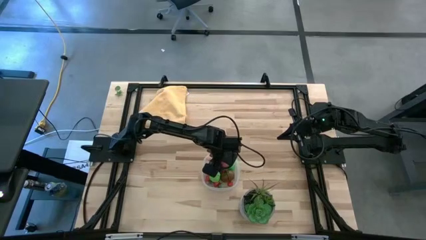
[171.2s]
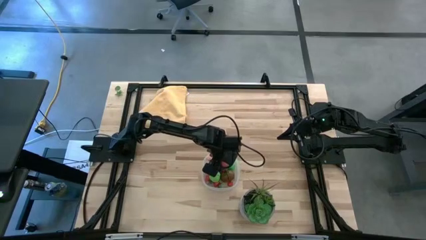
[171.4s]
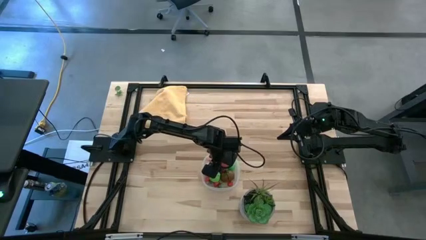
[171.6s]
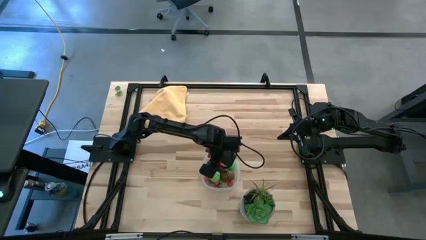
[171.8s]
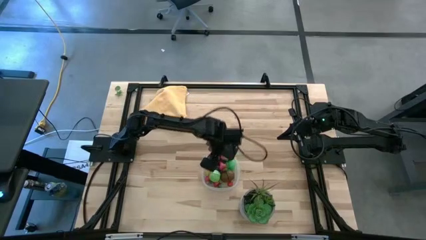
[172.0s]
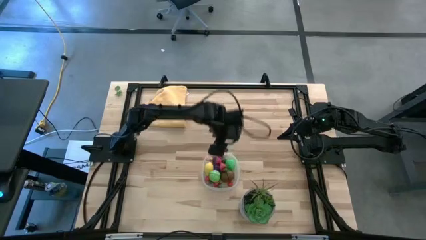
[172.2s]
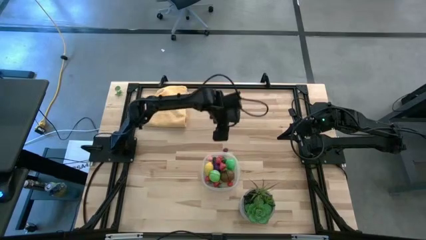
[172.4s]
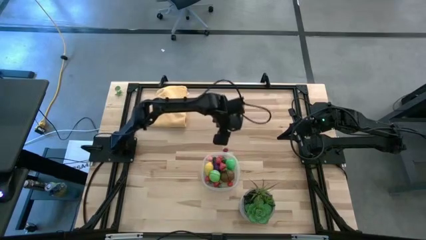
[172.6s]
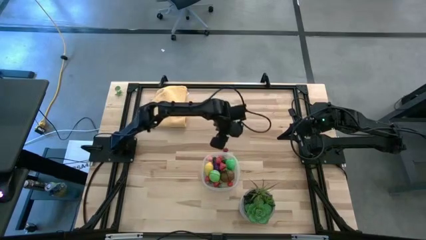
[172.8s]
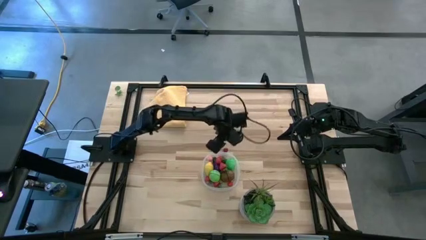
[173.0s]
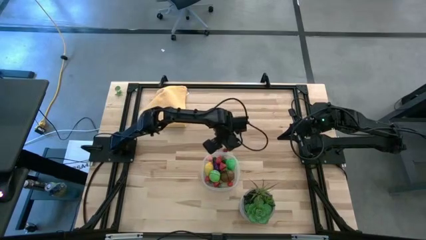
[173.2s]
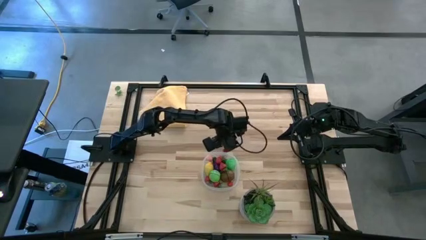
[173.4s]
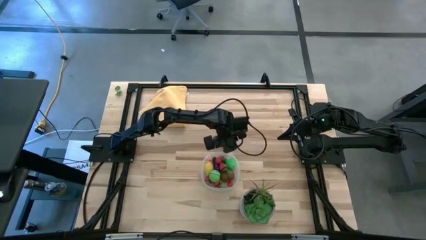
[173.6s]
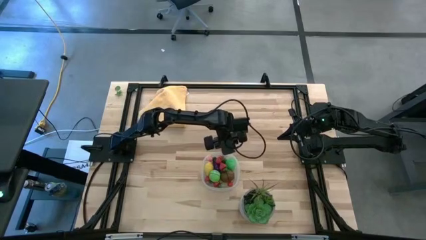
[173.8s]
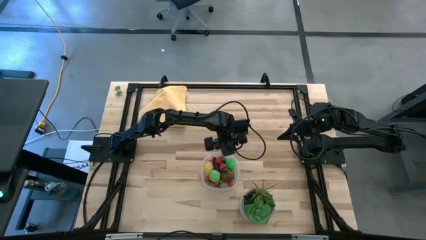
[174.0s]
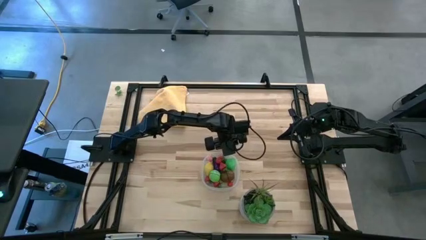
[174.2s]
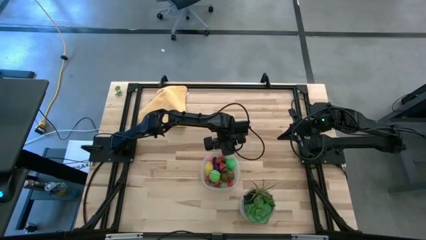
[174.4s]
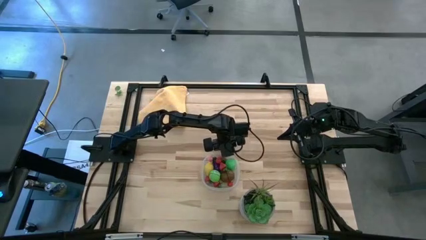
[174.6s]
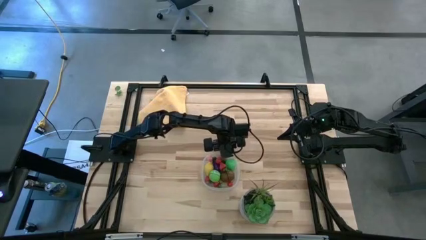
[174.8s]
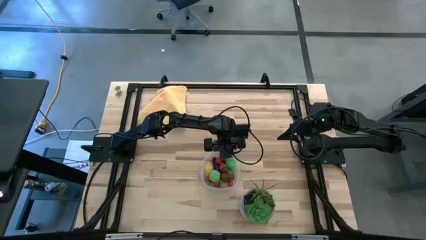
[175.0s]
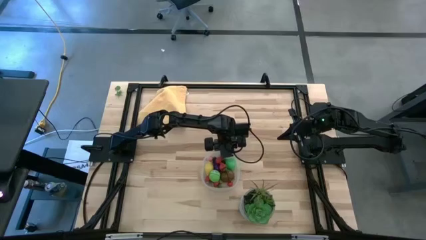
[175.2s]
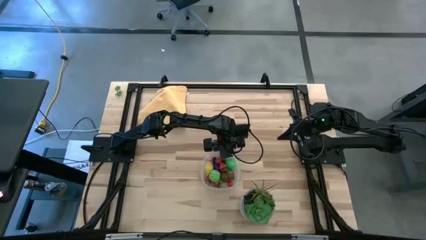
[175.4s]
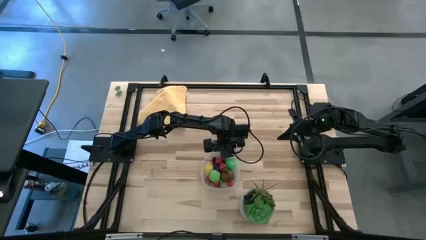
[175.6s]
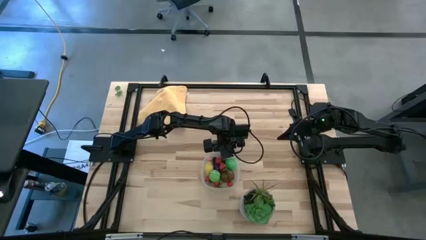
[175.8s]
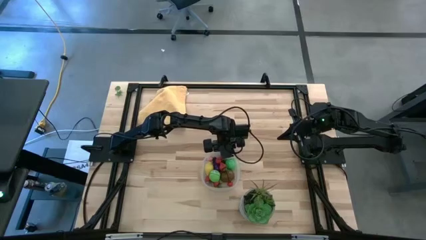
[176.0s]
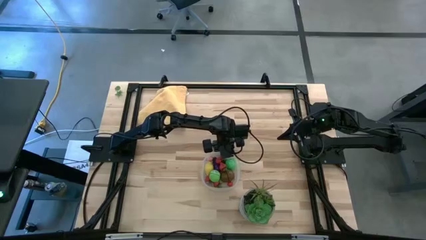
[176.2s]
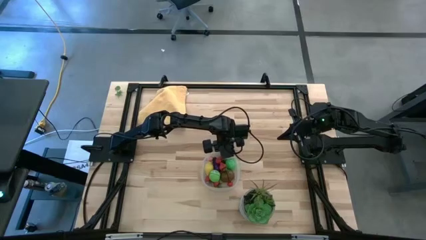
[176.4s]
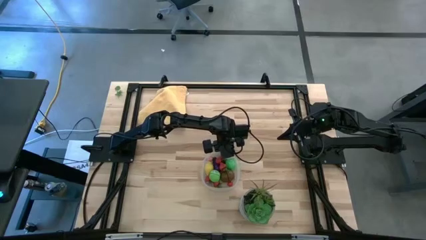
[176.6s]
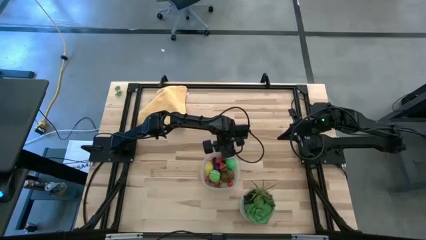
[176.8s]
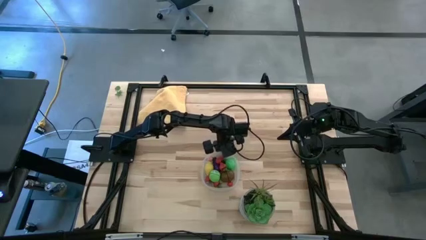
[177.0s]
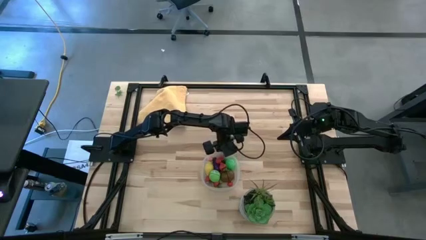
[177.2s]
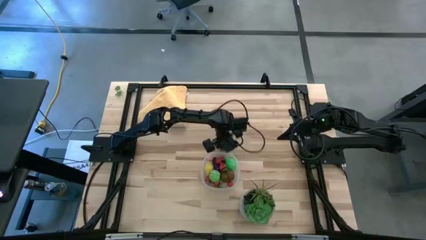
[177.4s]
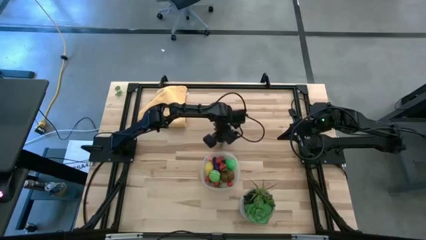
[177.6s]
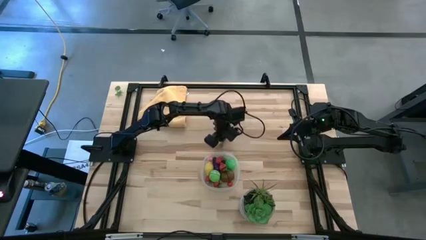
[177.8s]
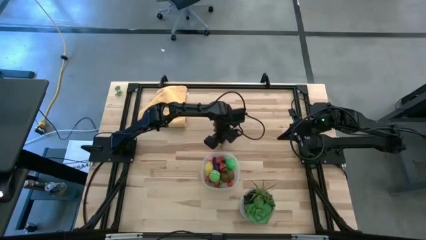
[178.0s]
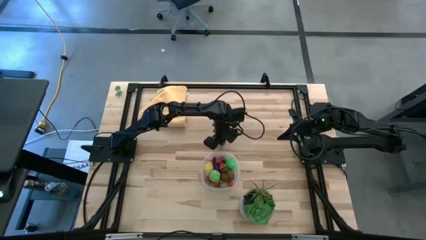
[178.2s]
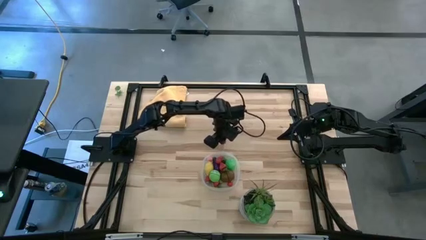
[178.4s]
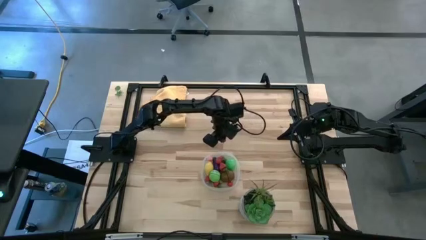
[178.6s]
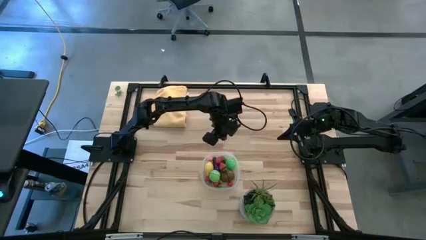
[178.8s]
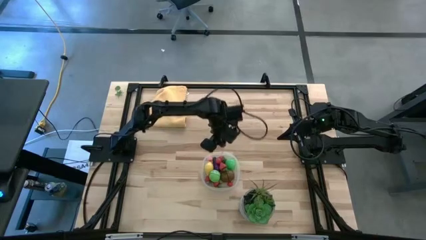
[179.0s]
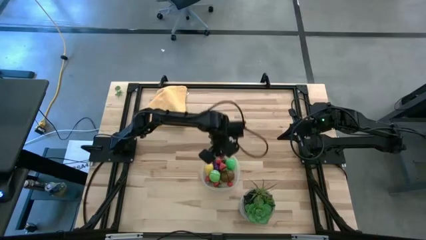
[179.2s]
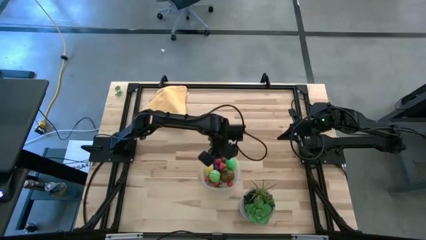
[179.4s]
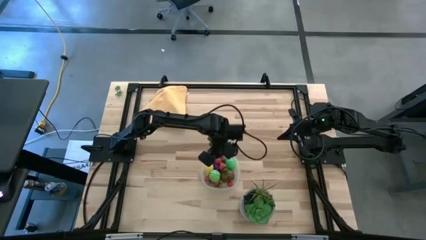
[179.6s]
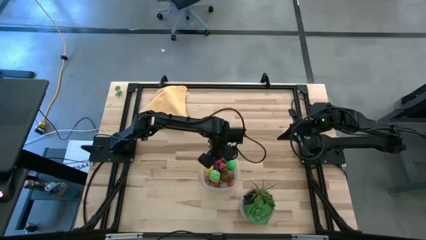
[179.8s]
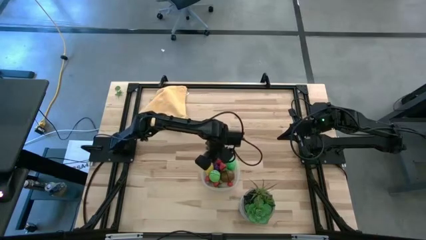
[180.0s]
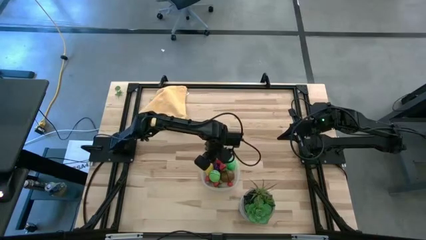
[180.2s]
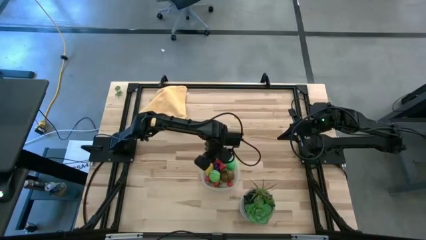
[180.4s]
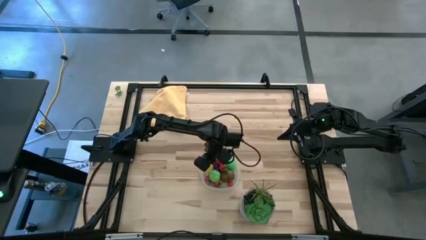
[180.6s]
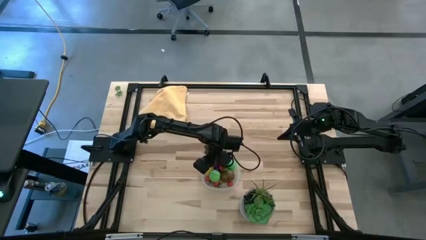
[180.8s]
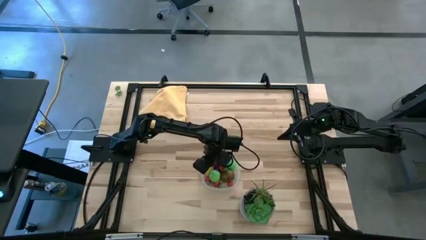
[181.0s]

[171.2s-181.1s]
Task: Pick and placing Produce into tupperware
Put the red cherry into the transparent bin

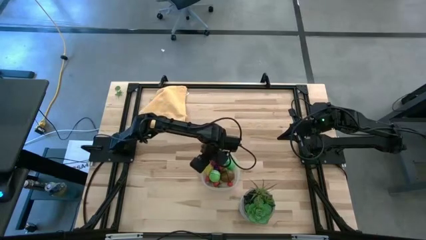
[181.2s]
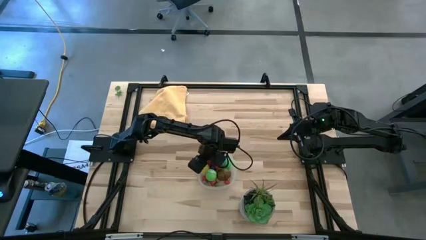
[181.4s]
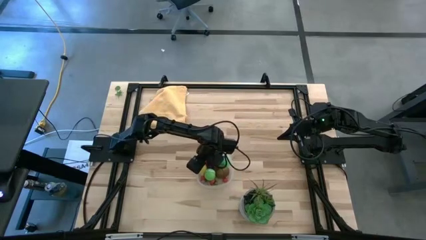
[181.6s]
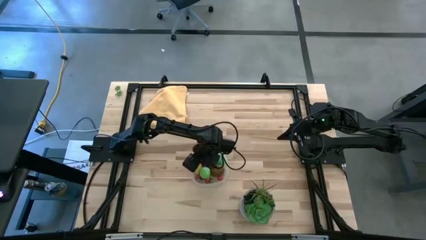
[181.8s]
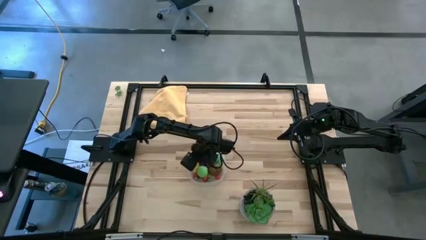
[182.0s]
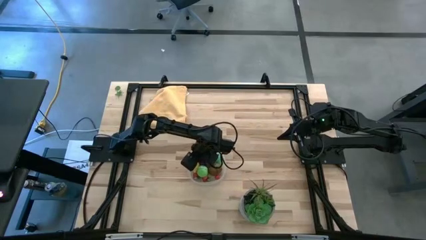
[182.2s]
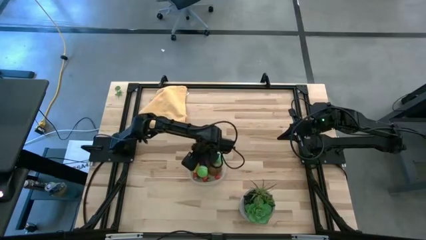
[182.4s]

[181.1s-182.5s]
Adjust the transparent bin

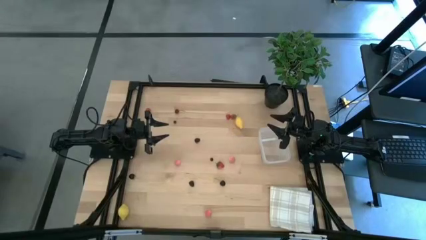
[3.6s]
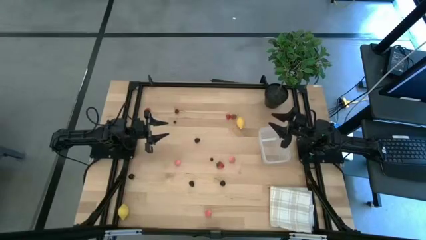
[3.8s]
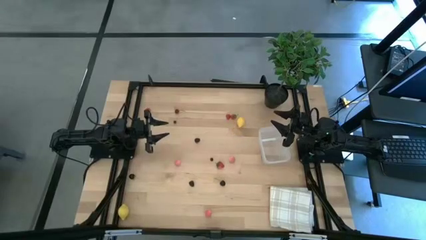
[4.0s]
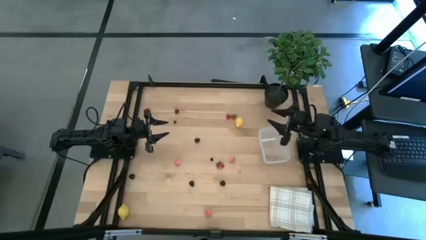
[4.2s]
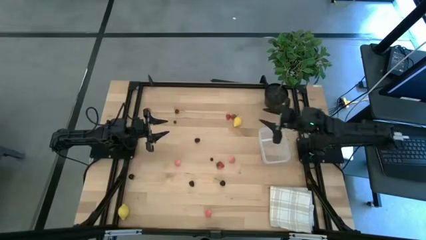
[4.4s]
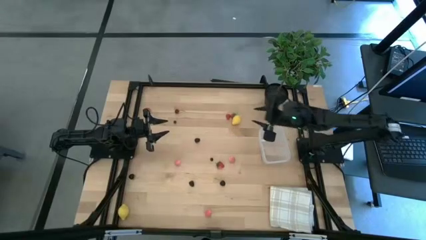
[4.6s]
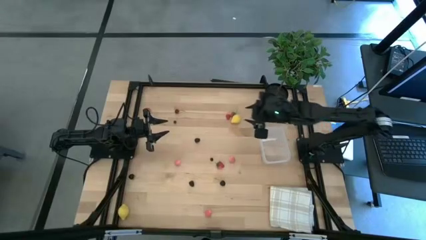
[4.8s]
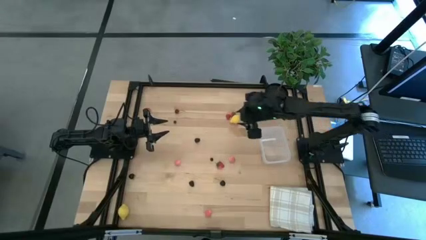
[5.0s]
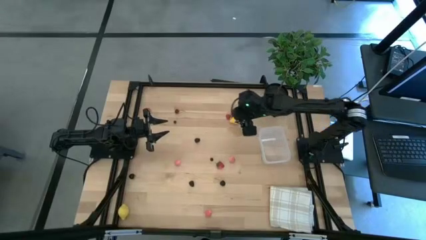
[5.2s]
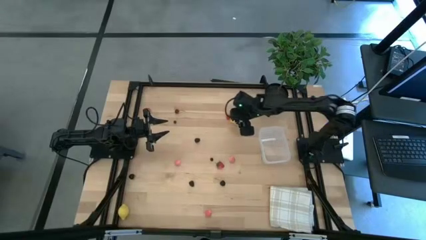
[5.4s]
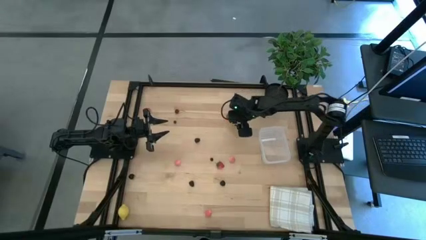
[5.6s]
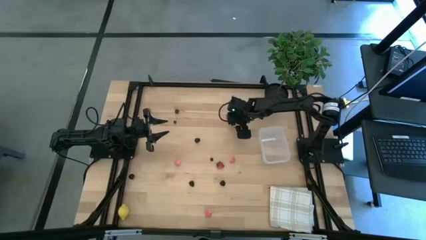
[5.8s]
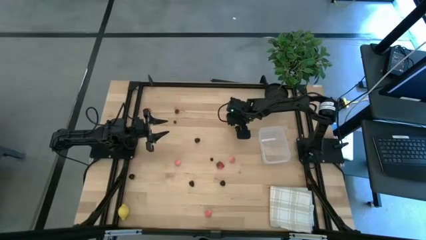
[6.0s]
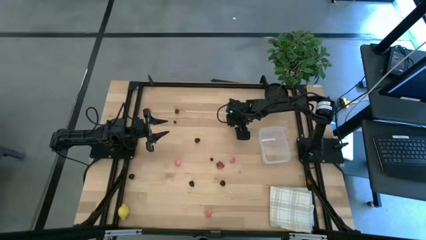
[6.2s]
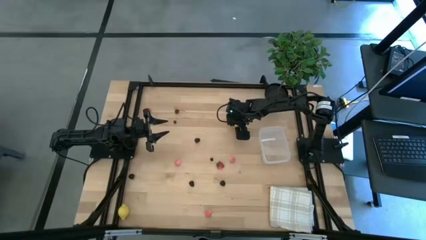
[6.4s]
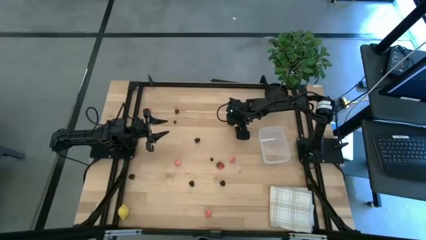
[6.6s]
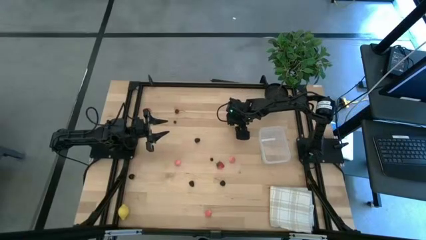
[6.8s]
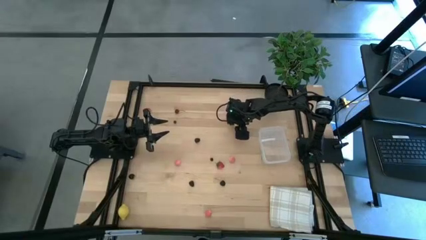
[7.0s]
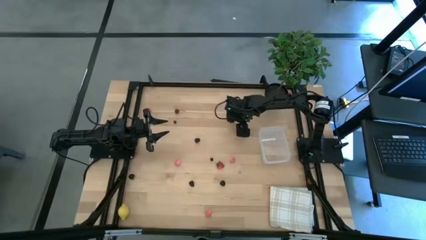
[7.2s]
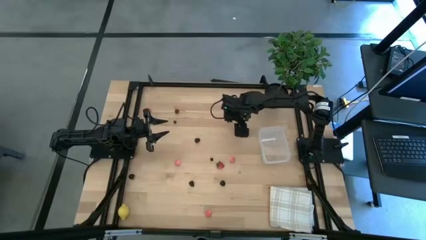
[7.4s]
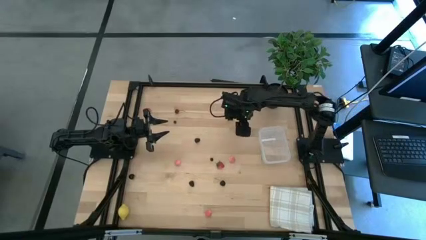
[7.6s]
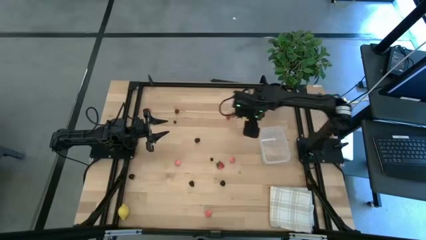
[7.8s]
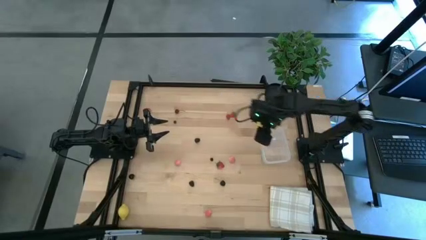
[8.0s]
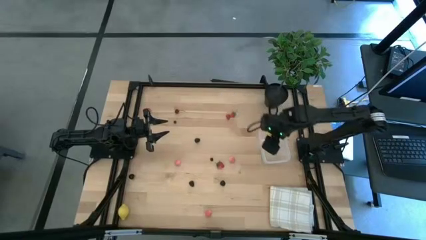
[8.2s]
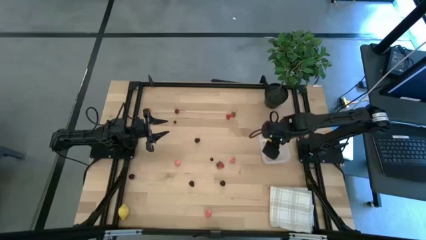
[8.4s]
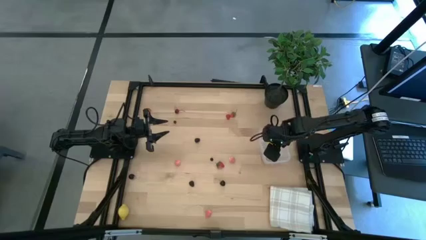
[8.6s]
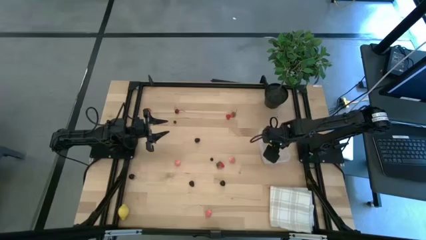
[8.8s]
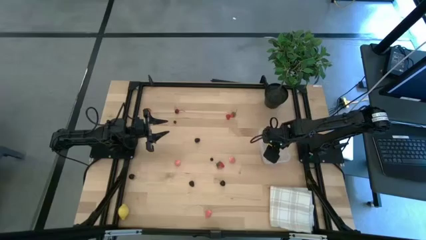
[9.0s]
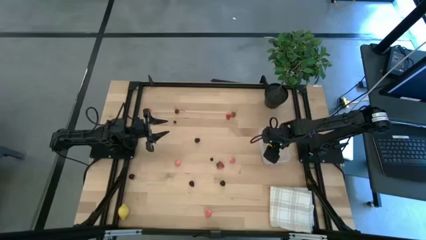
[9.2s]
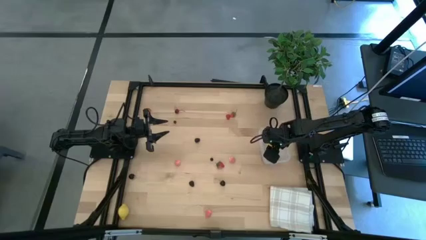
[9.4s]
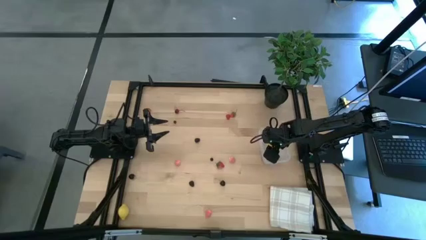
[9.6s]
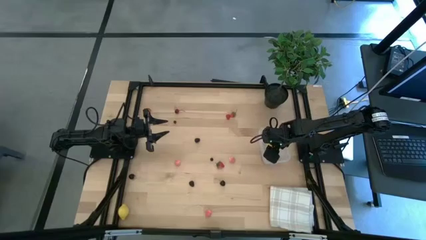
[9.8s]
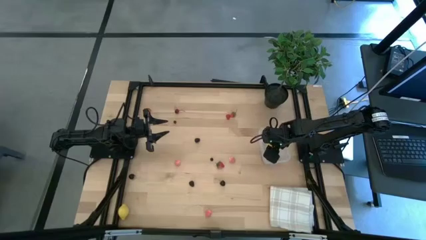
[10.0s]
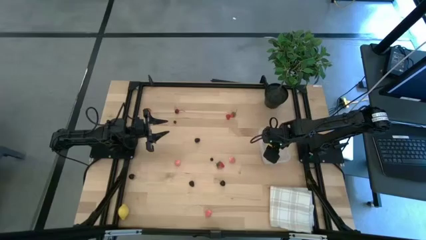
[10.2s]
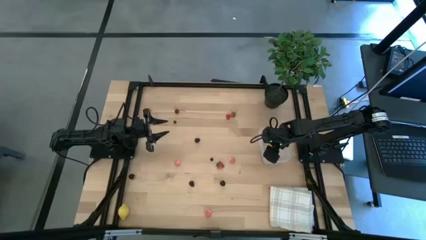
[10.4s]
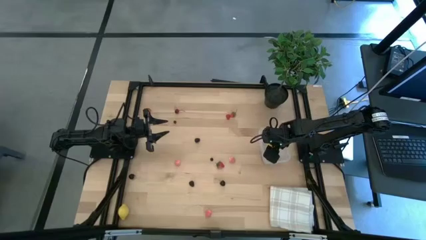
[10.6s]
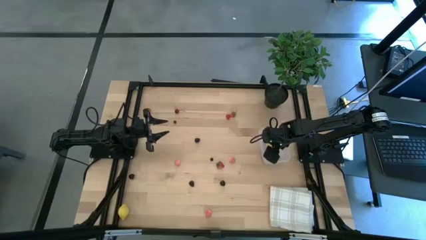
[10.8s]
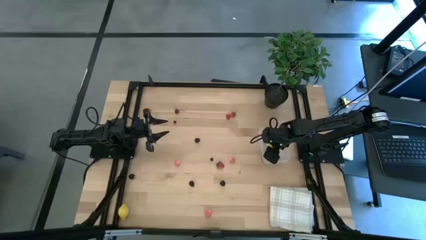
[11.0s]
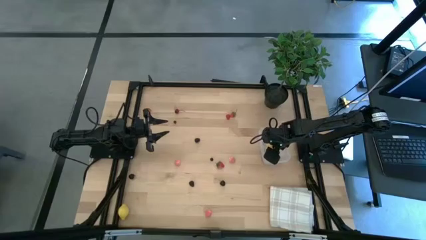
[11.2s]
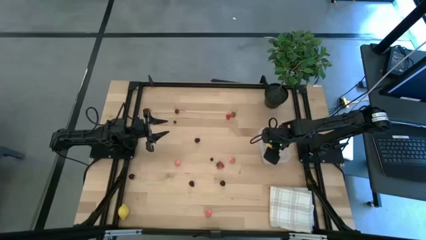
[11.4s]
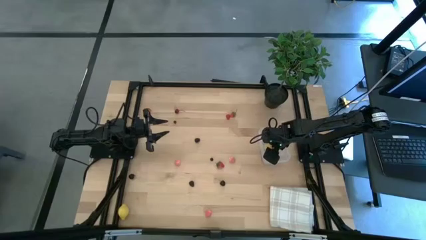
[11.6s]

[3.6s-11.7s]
Task: Pick and placing Produce into tupperware
Put the top lemon into the transparent bin
